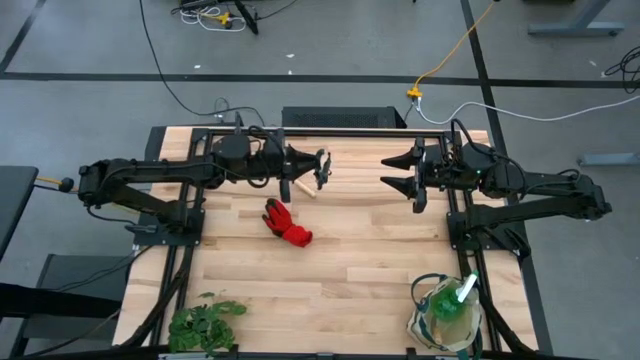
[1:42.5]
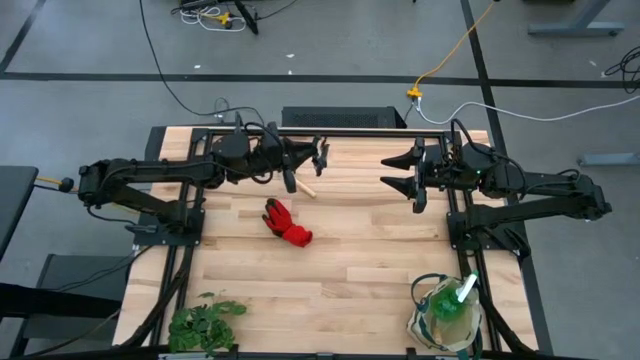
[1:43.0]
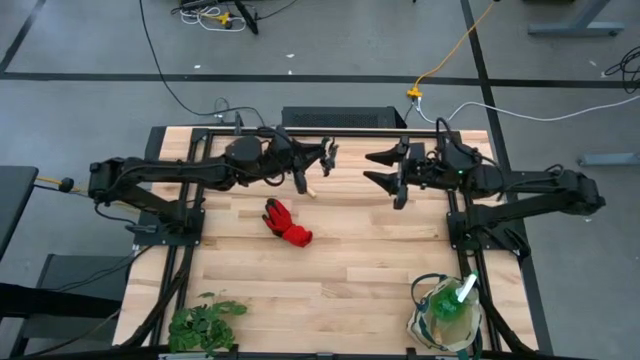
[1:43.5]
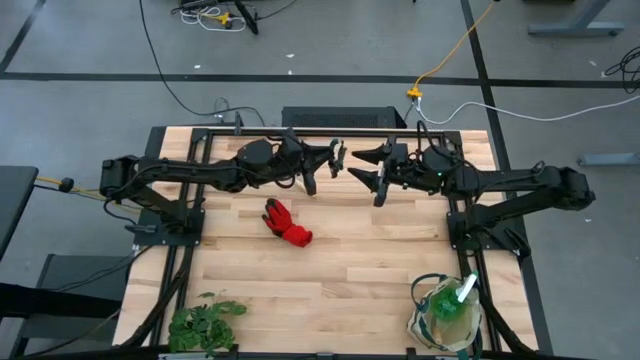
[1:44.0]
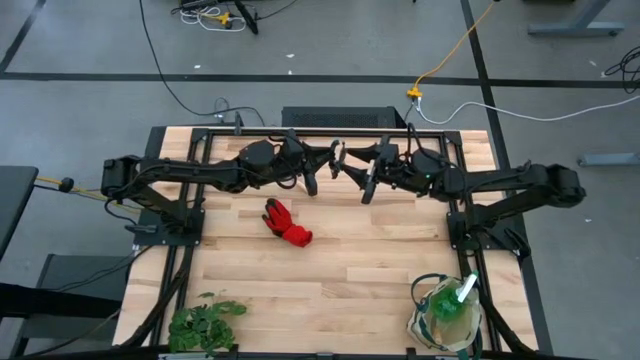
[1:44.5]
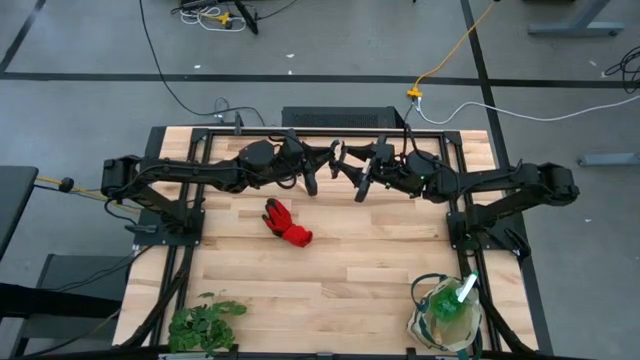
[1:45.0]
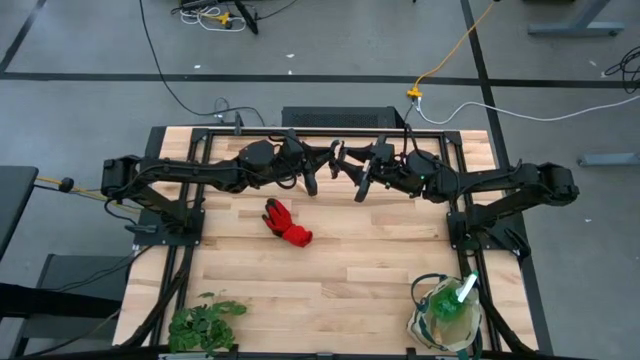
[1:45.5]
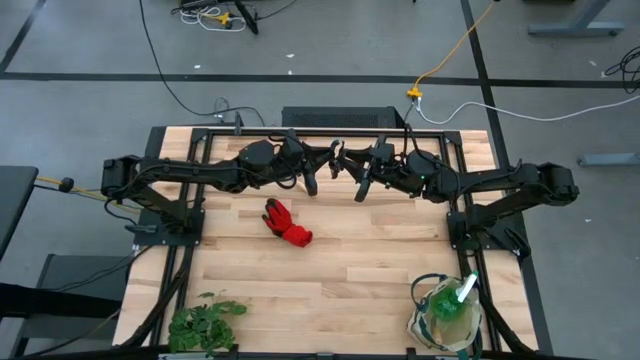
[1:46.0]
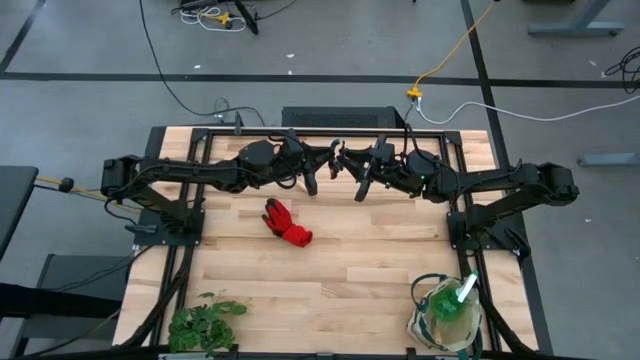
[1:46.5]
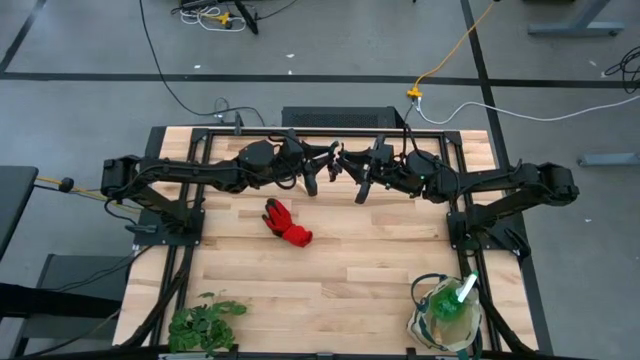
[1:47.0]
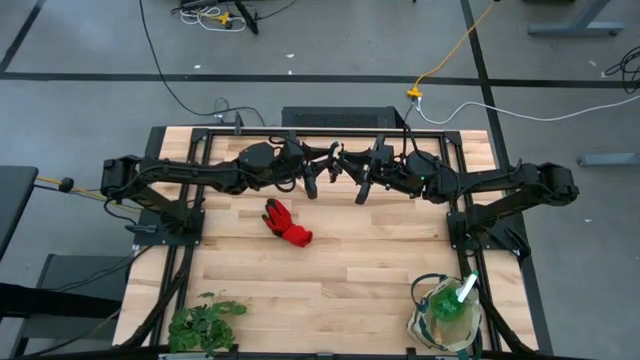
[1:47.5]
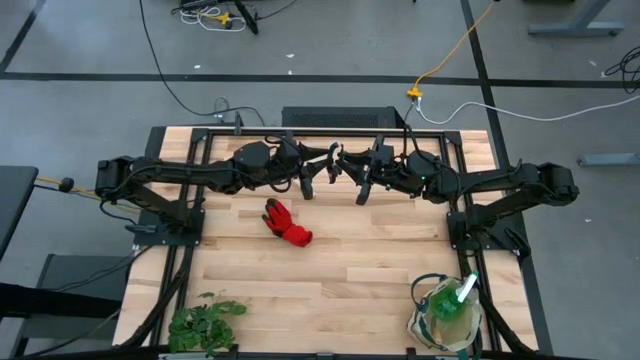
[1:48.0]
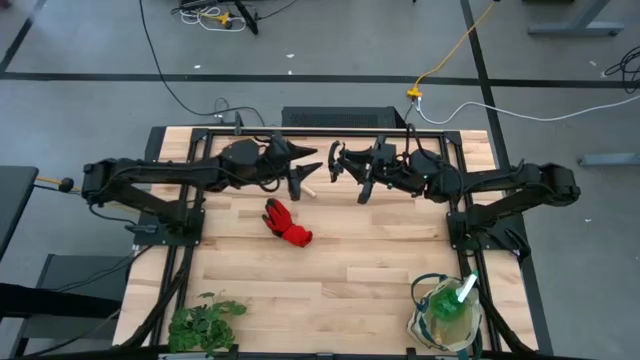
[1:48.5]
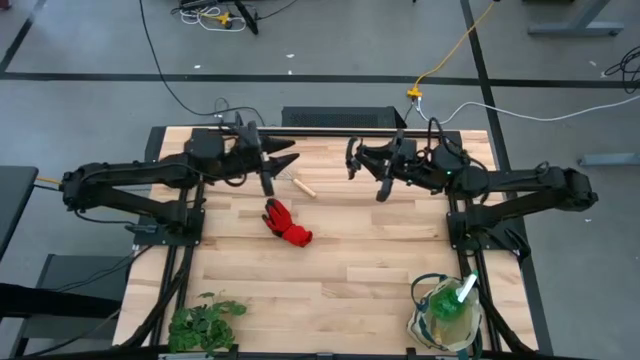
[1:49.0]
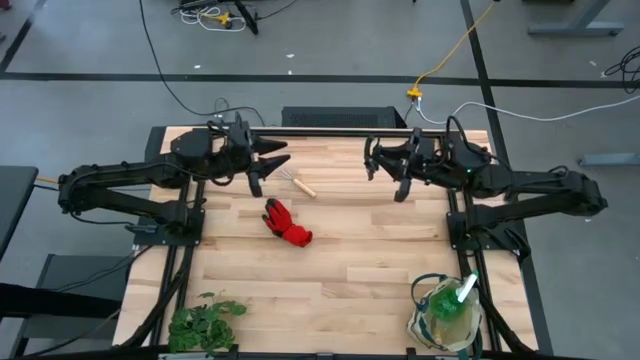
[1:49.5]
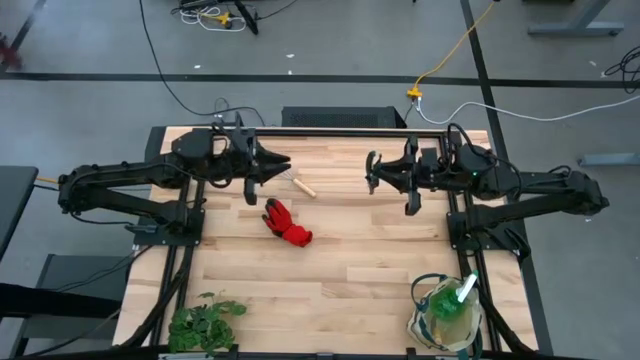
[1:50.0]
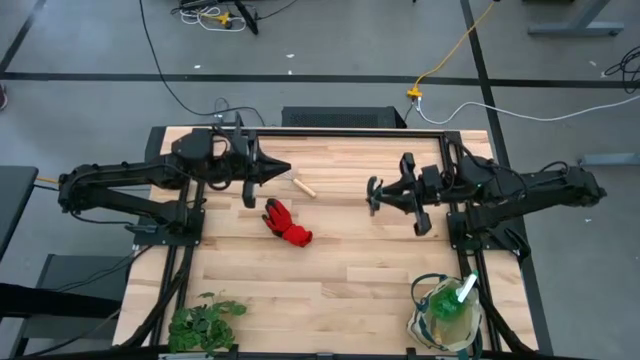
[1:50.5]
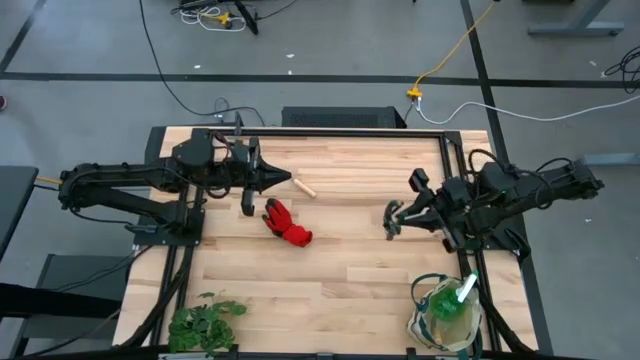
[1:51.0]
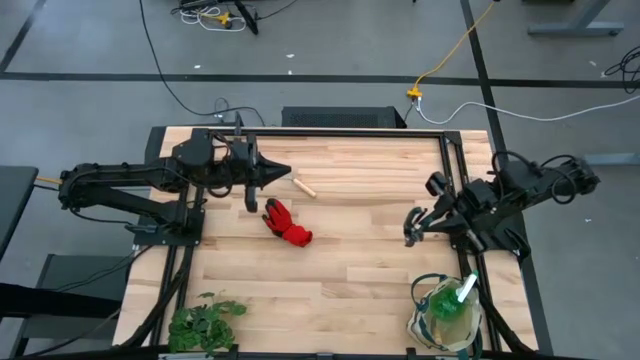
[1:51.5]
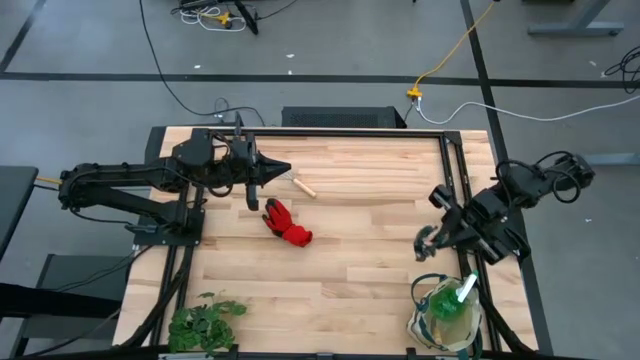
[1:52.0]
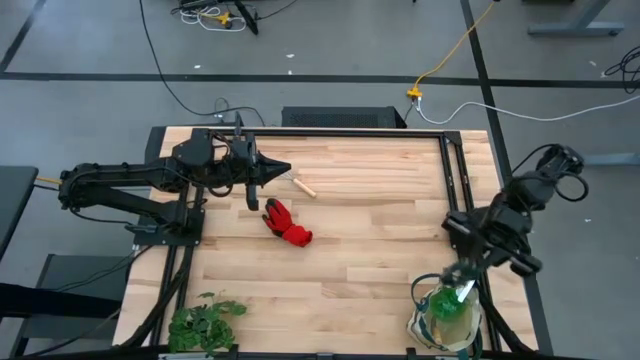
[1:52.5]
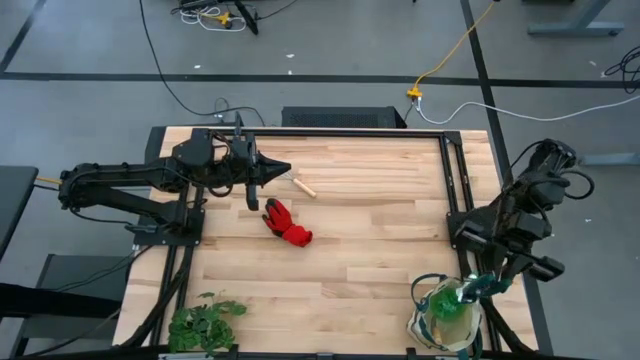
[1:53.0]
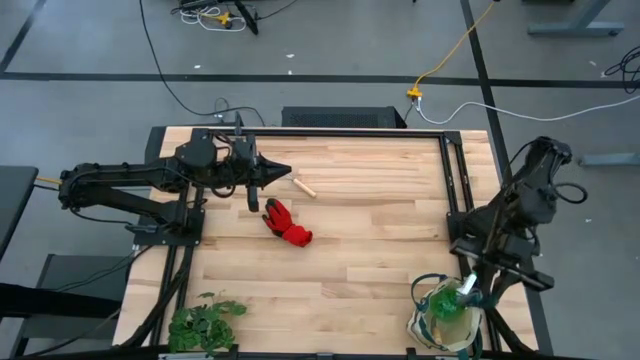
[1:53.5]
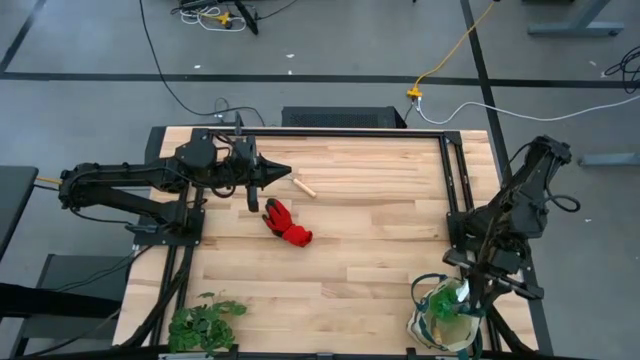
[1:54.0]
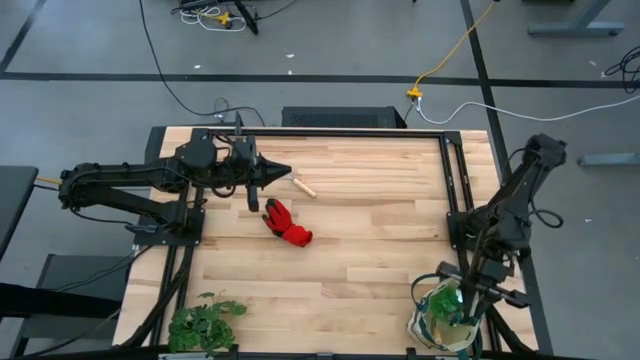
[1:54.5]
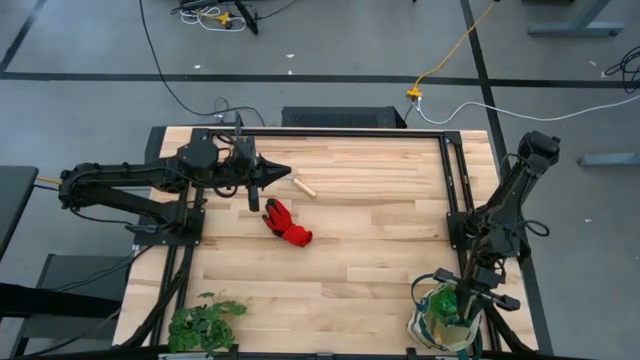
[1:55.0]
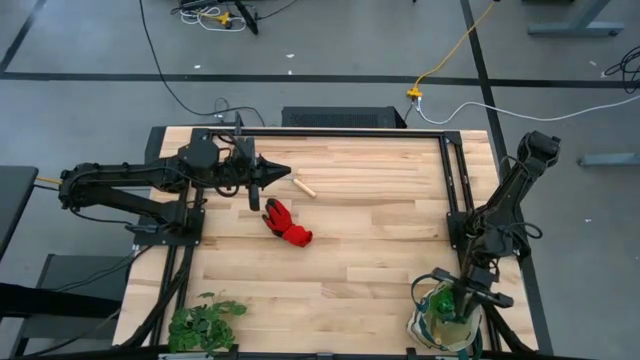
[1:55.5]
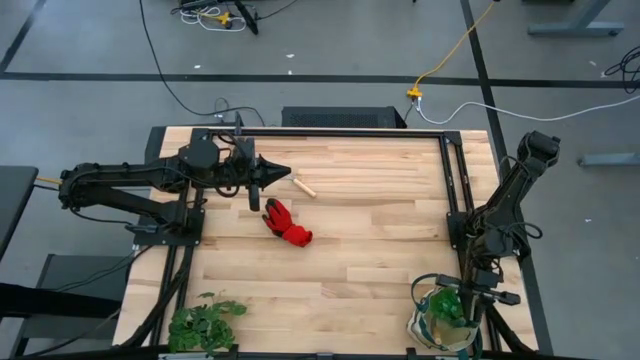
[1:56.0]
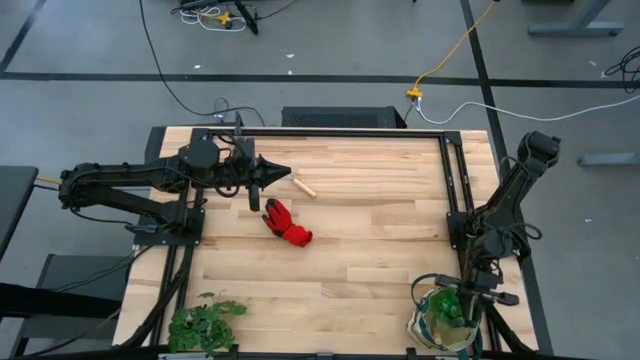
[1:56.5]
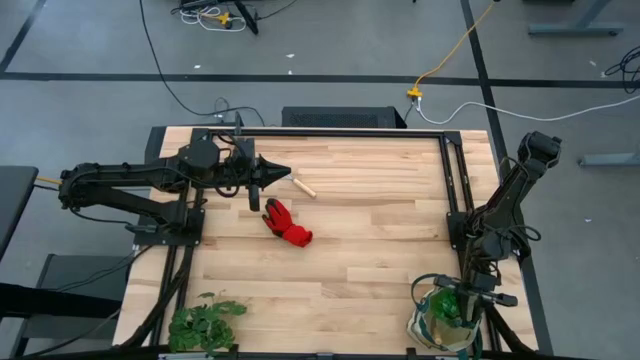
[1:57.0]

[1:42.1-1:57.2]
Task: Pick & Place Garden tools in Gardening bag
Put the shear scissors into the gardening bag

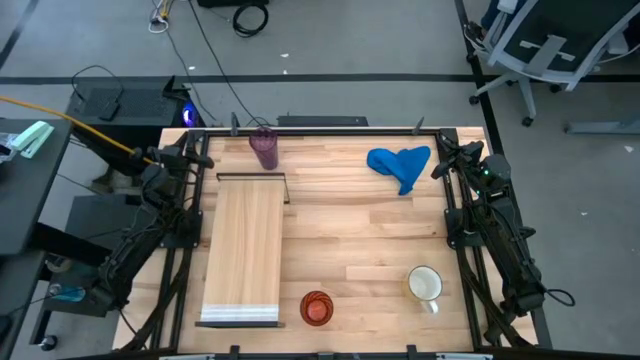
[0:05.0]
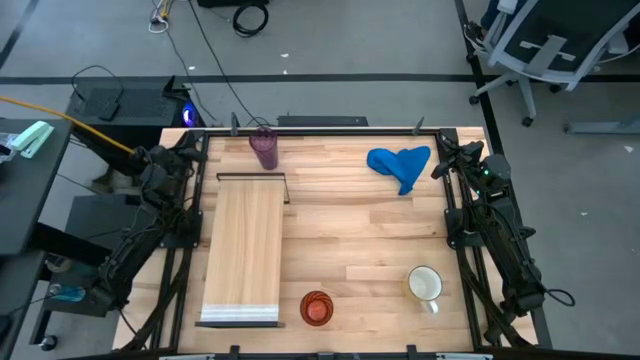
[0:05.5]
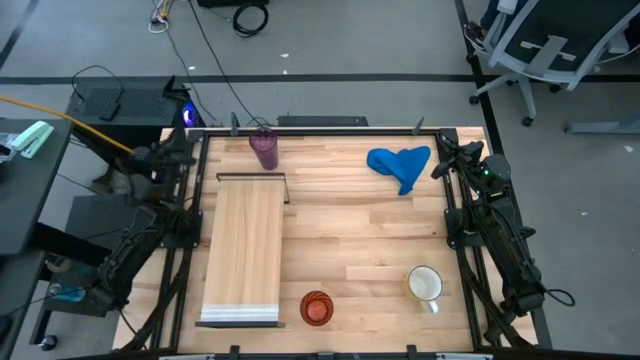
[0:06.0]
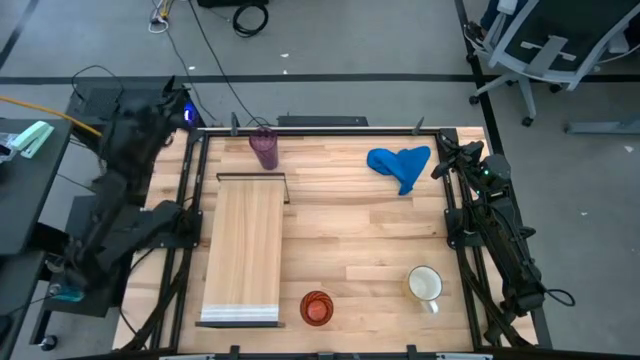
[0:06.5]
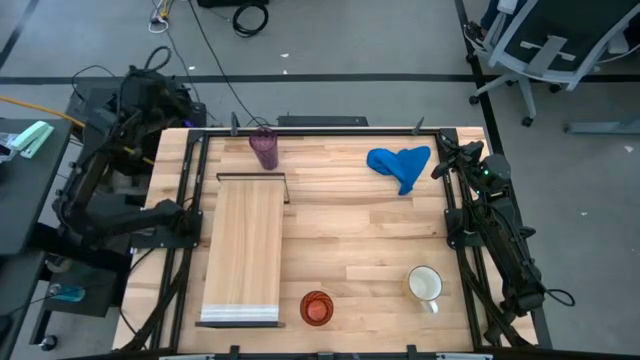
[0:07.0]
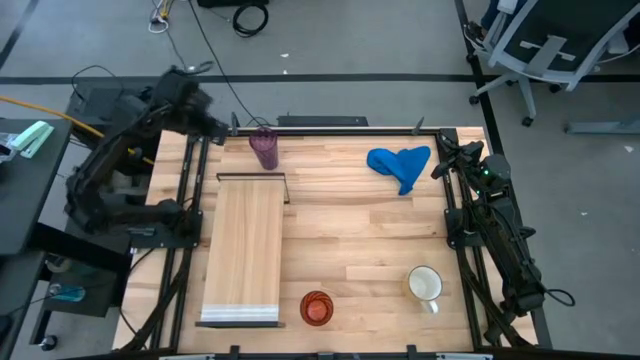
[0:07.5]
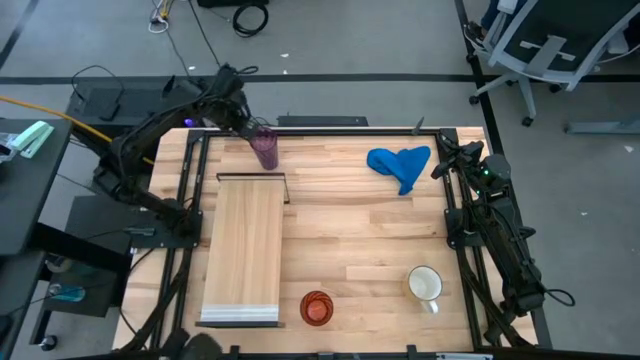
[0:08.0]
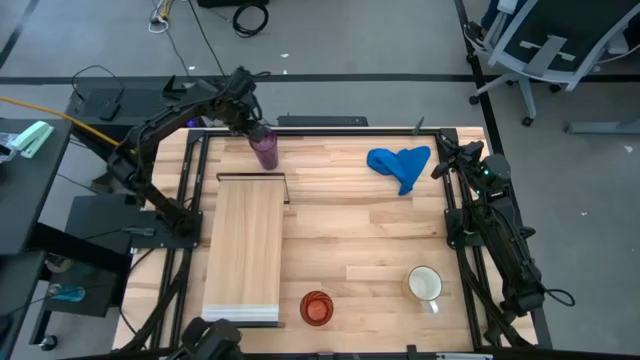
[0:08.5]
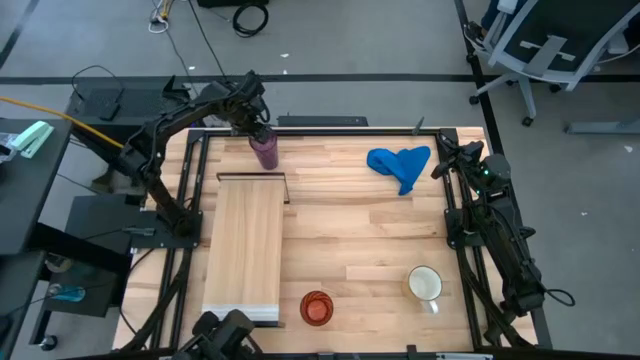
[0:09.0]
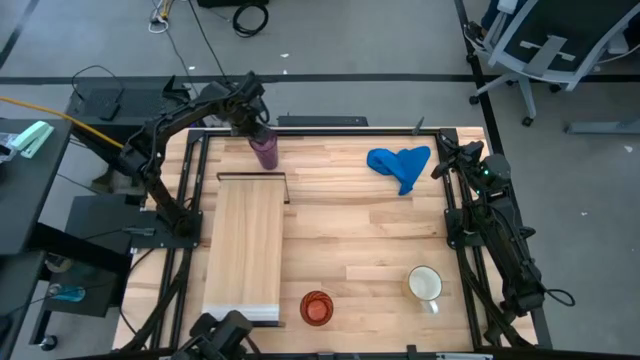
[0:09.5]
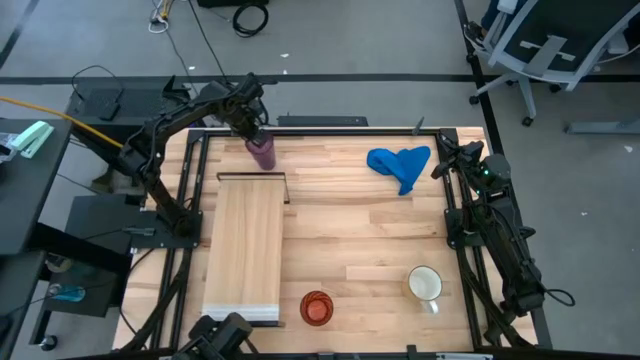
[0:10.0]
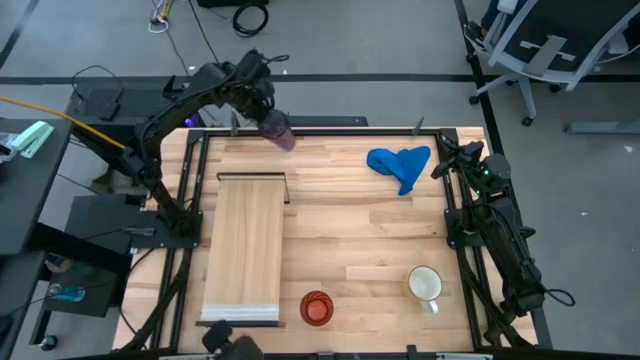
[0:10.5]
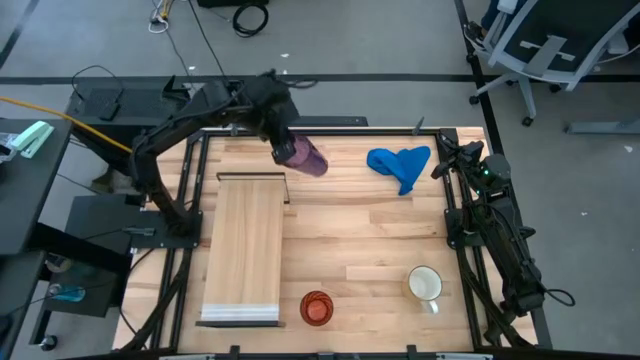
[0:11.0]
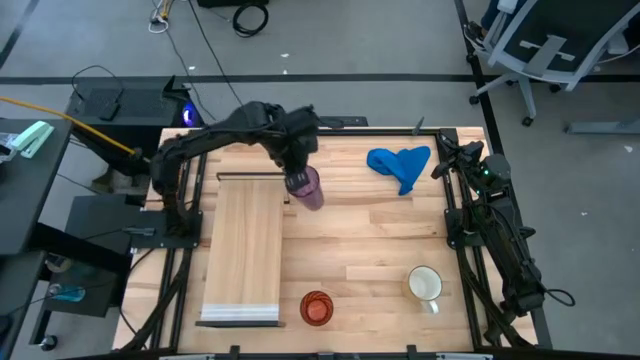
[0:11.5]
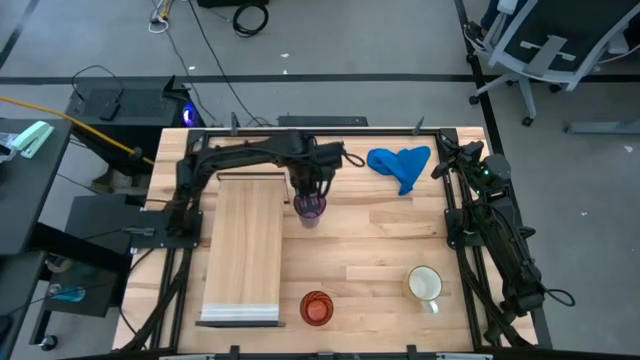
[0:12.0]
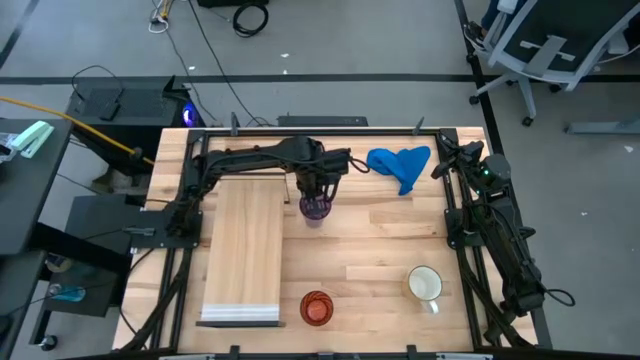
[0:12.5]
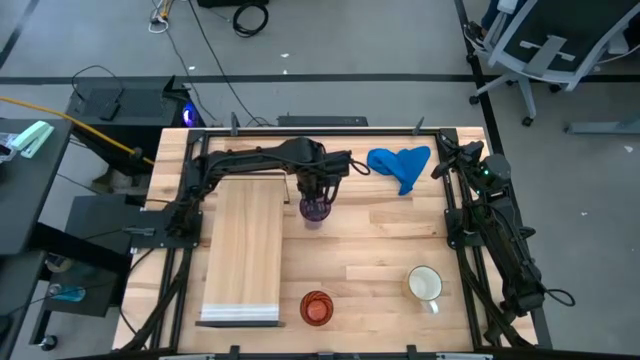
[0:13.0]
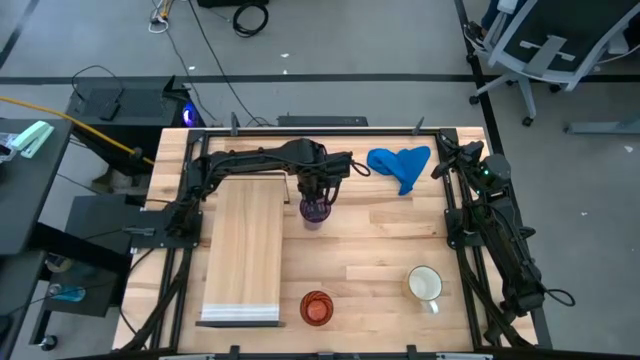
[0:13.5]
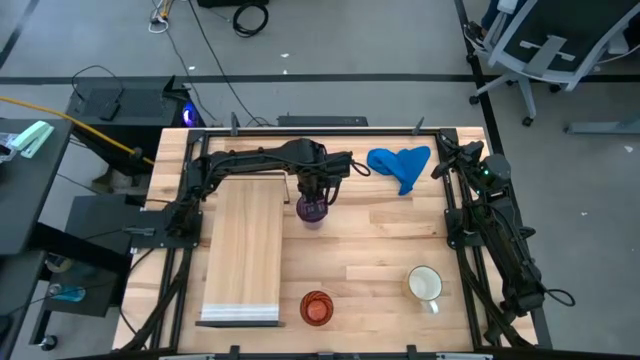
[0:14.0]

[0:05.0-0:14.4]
Task: Stack small to large cups/mugs on shelf
Move the purple cup to the center of the table
